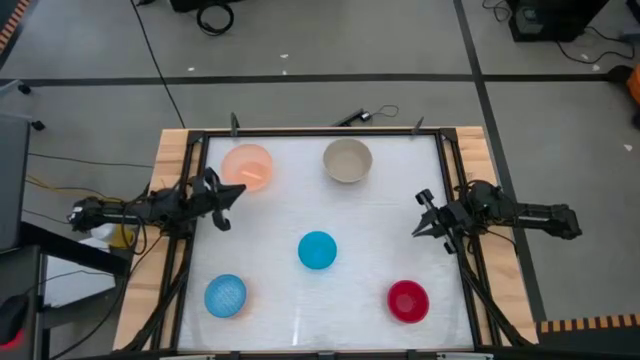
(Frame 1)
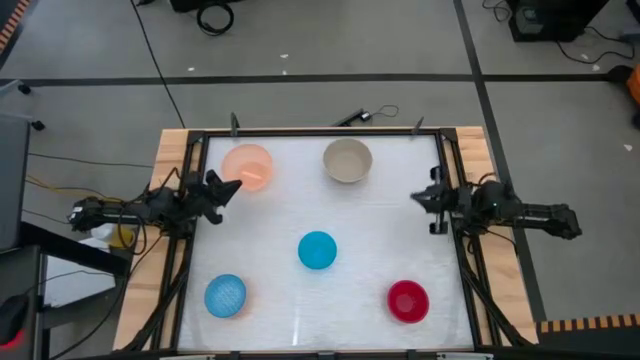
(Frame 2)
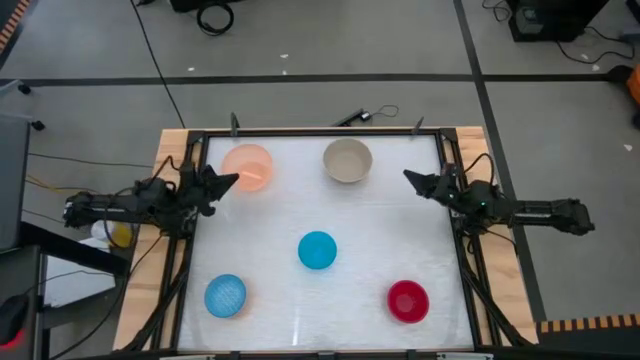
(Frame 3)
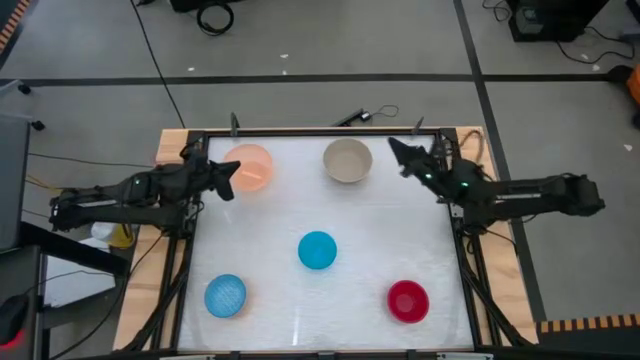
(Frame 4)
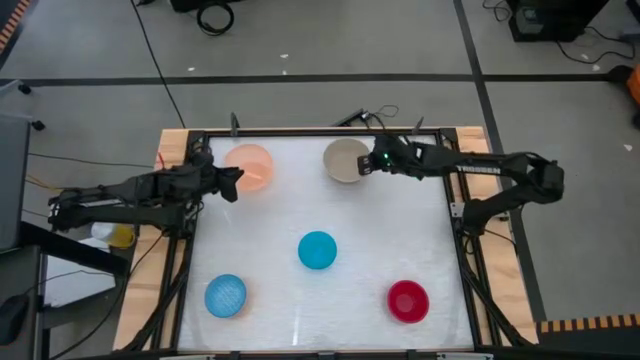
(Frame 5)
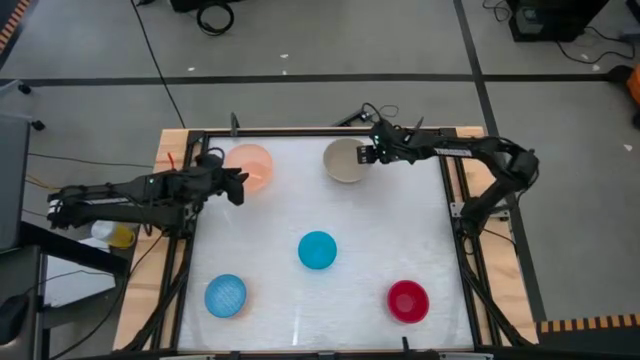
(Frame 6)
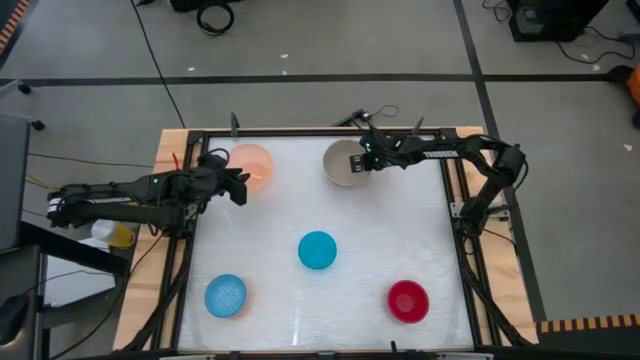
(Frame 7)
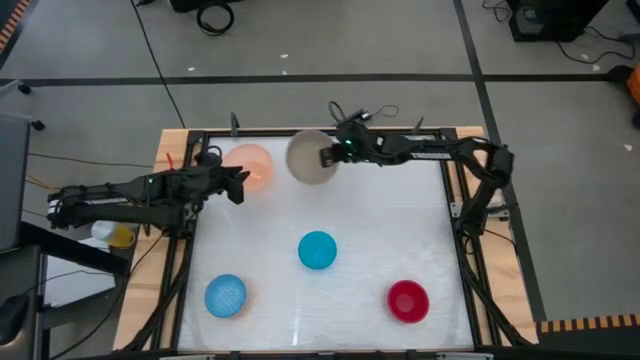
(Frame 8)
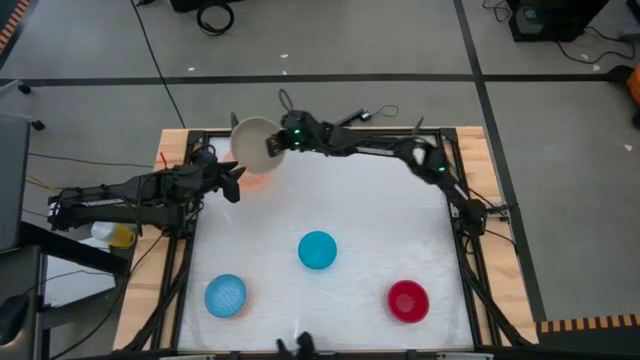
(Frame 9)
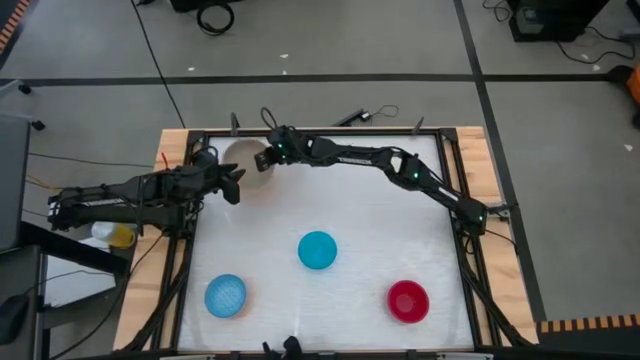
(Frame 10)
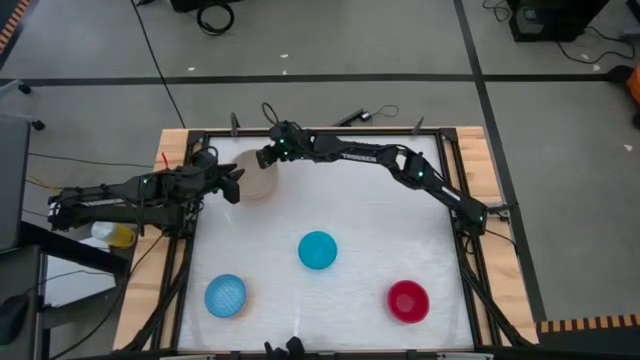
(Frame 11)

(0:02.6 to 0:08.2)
Stack the gray bowl on top of the orange bowl

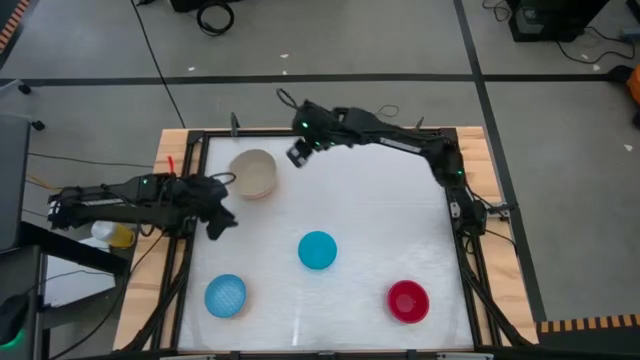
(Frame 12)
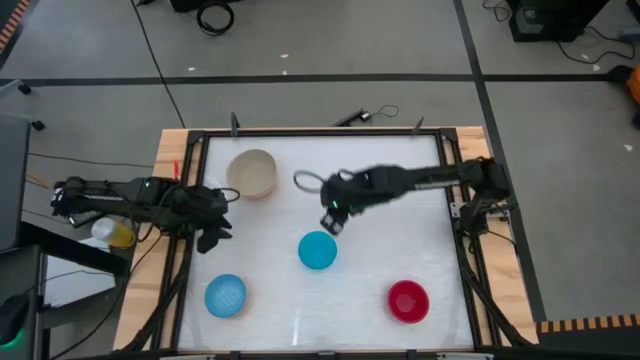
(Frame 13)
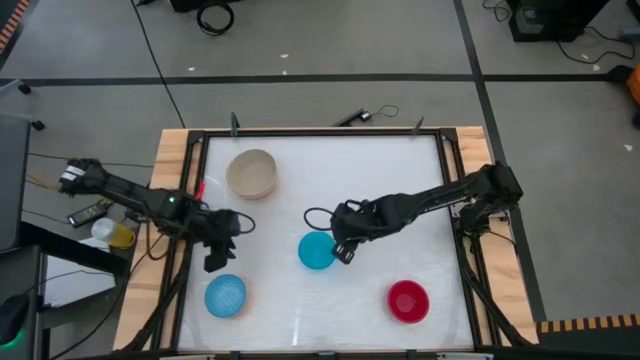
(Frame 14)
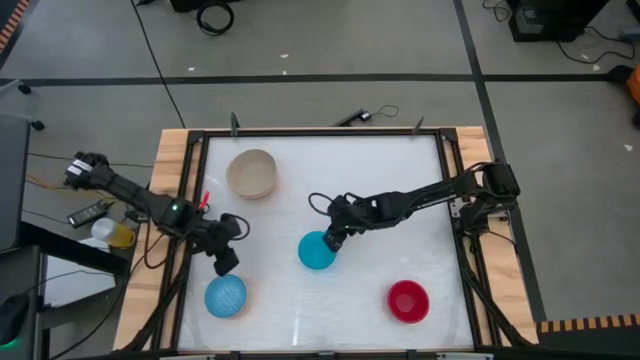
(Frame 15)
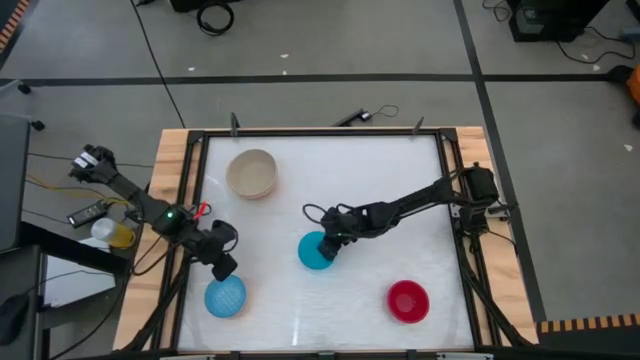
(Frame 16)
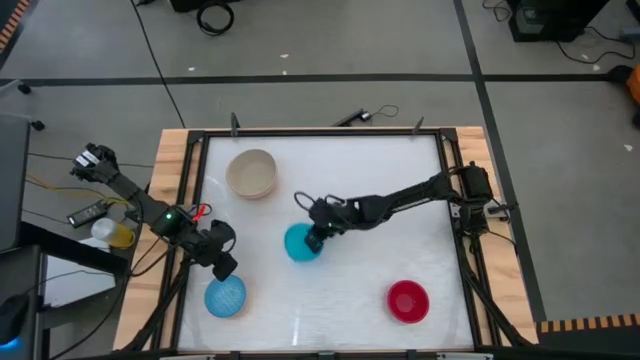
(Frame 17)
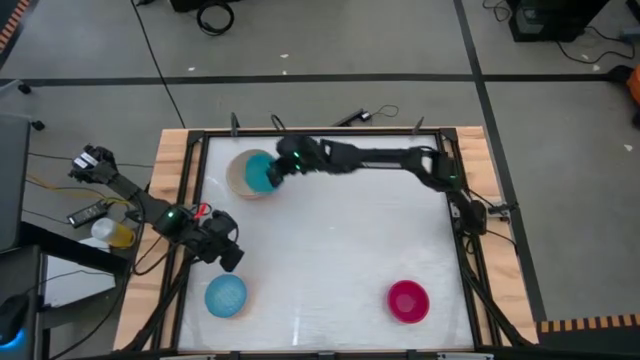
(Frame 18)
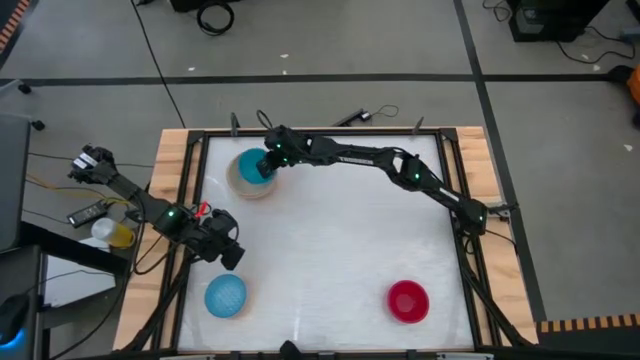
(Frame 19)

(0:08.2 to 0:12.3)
Stack the blue bowl on top of the gray bowl

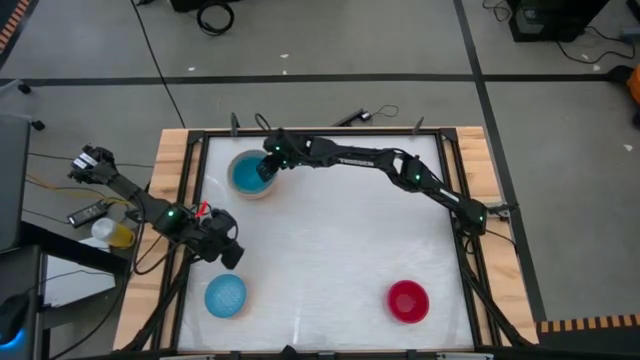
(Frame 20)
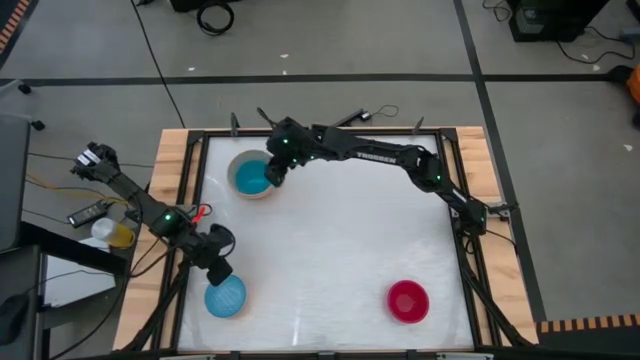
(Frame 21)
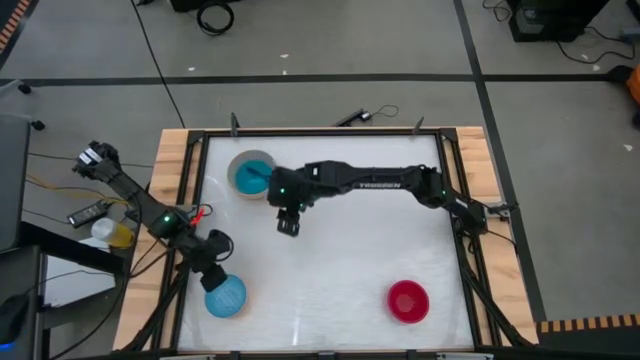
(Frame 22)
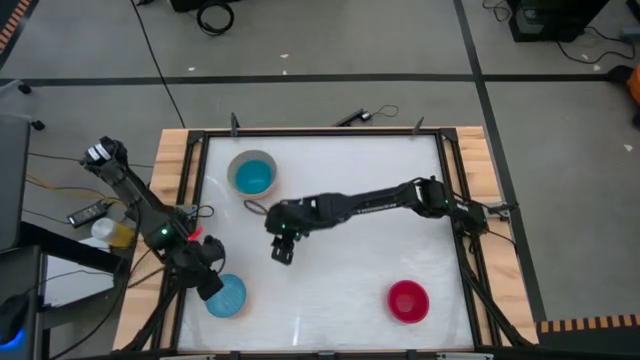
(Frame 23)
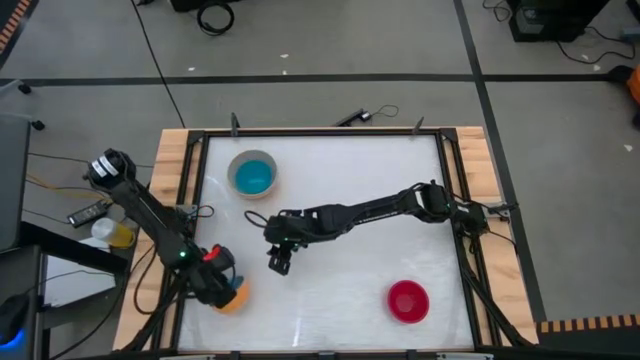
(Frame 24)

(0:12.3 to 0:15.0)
Stack the blue patterned bowl on top of the blue bowl

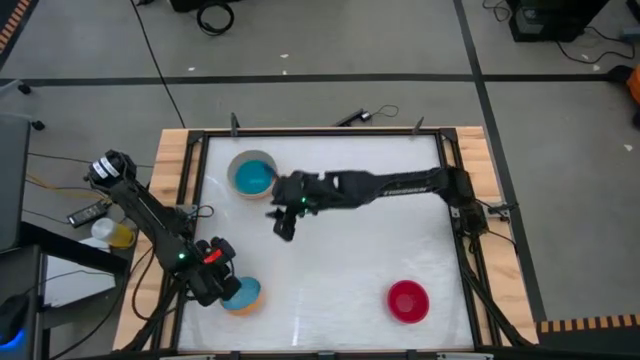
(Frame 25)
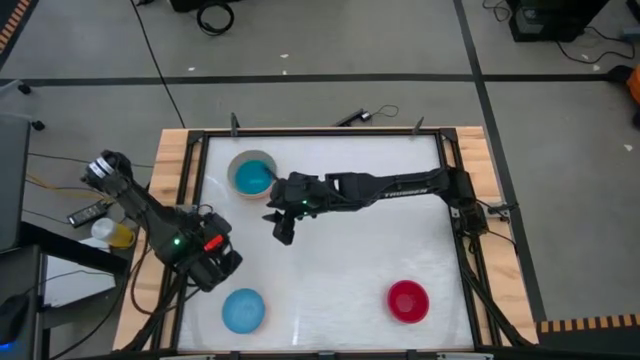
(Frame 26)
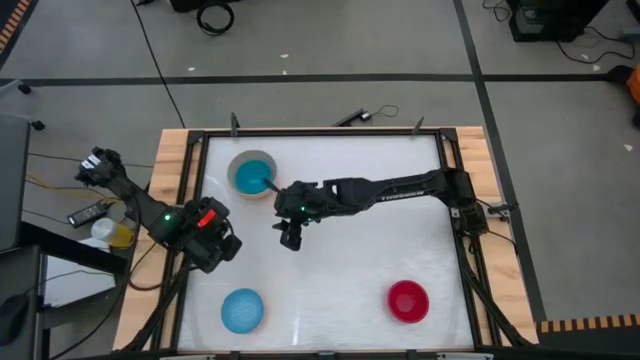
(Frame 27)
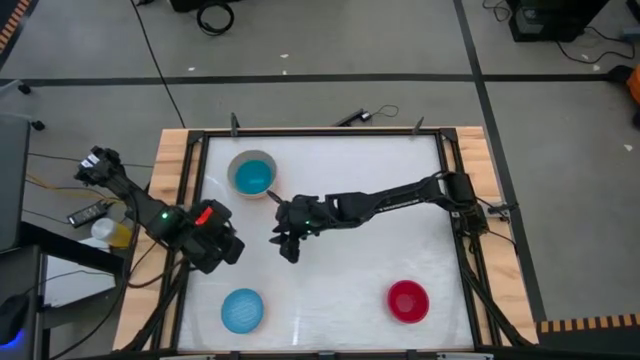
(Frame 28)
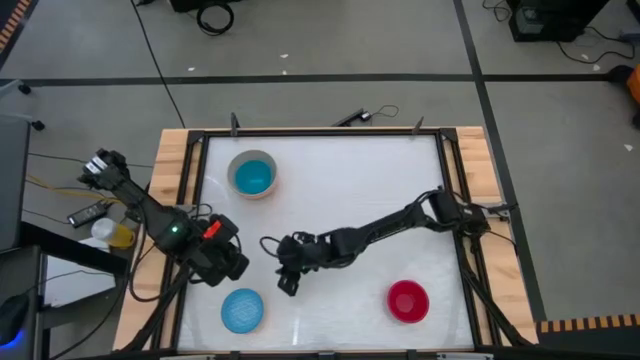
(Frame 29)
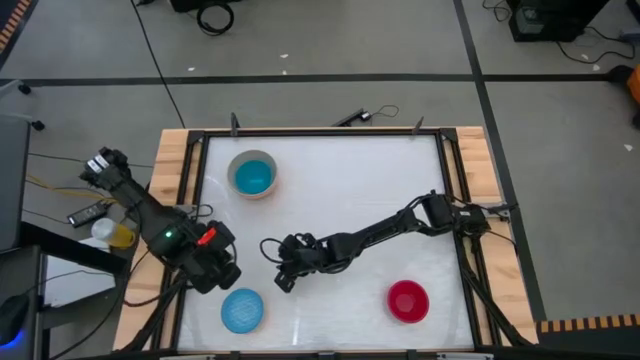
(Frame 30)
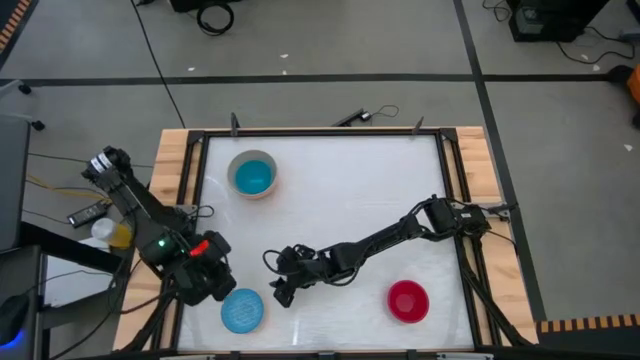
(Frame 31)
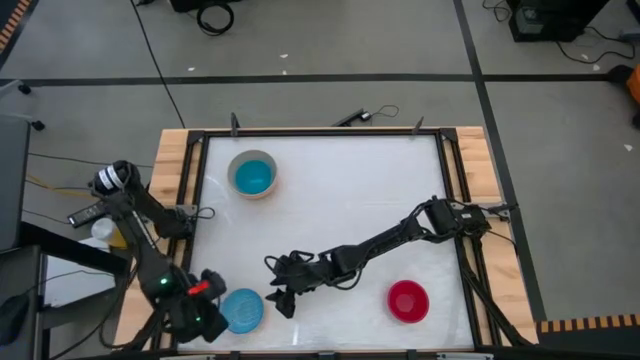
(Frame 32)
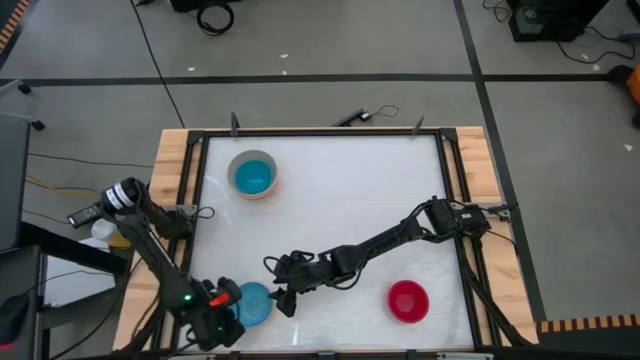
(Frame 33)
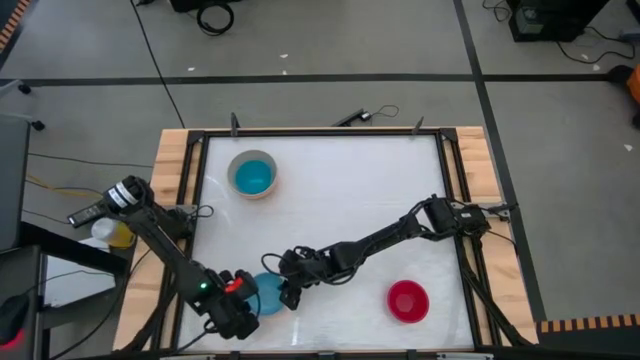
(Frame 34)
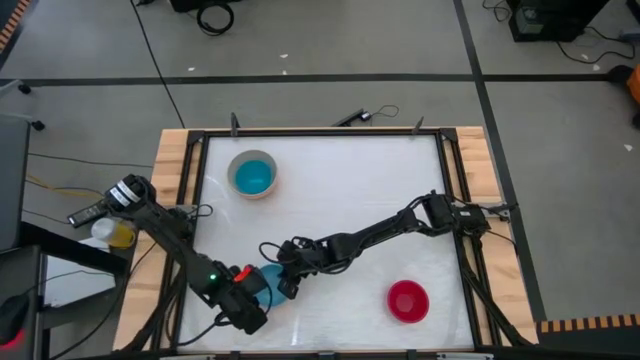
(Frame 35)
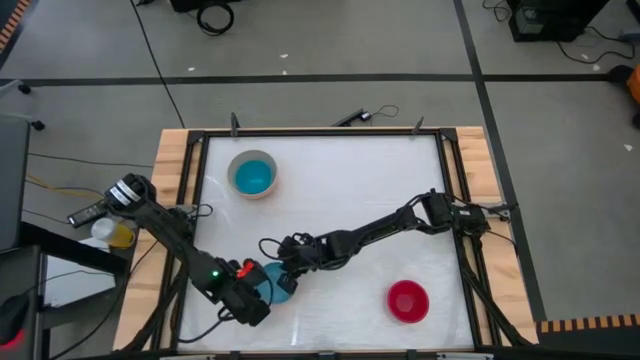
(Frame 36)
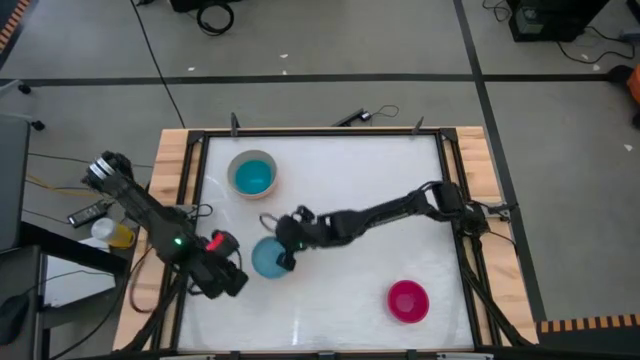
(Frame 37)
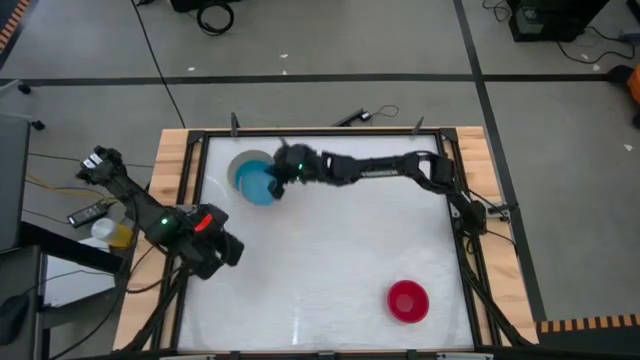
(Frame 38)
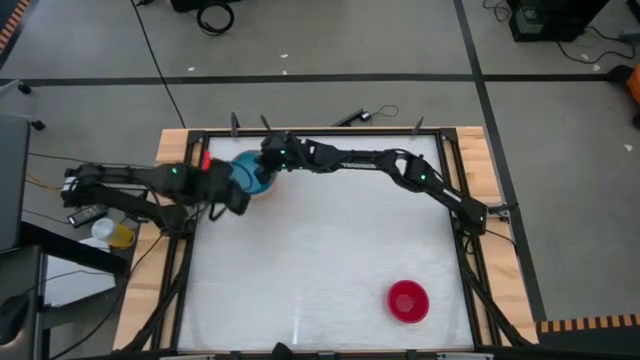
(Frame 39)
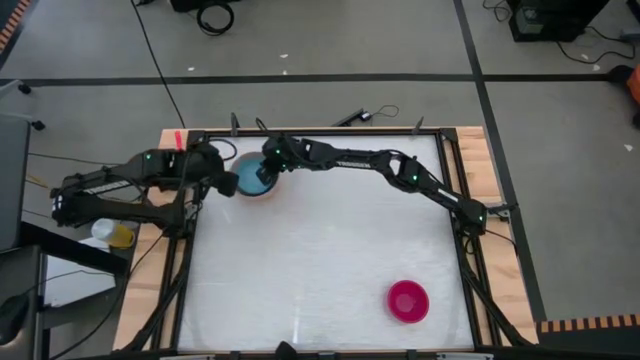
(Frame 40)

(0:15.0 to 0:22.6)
Stack the blue patterned bowl on top of the blue bowl

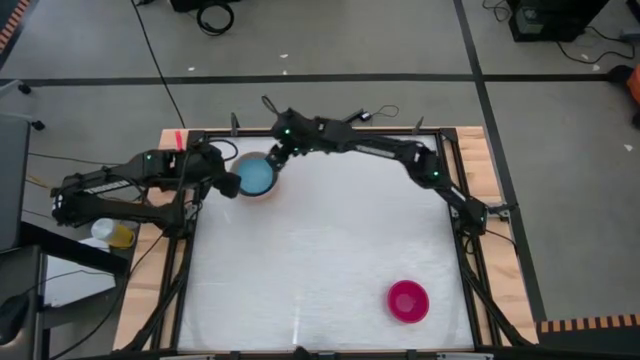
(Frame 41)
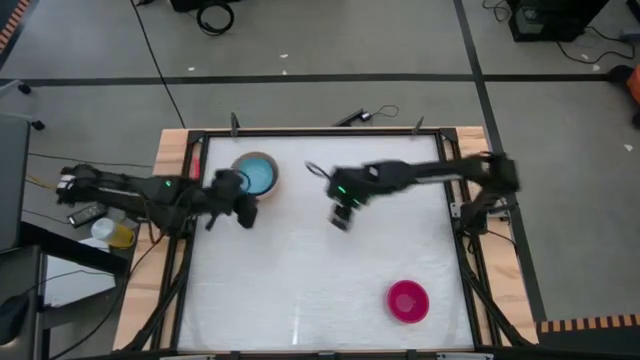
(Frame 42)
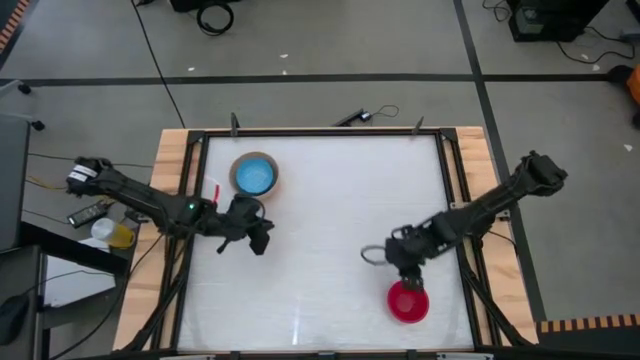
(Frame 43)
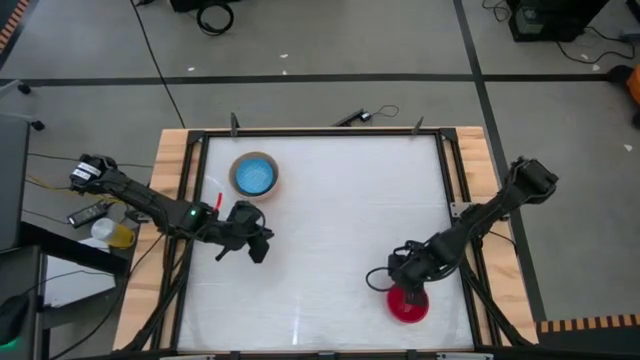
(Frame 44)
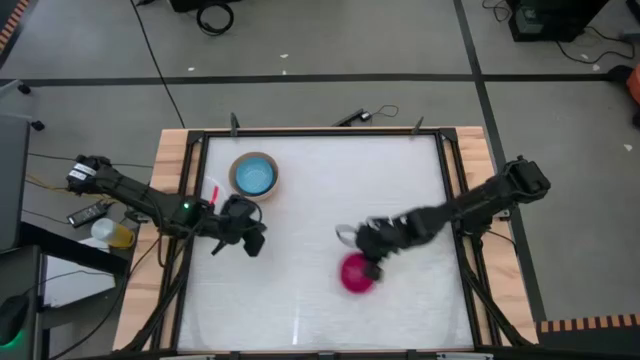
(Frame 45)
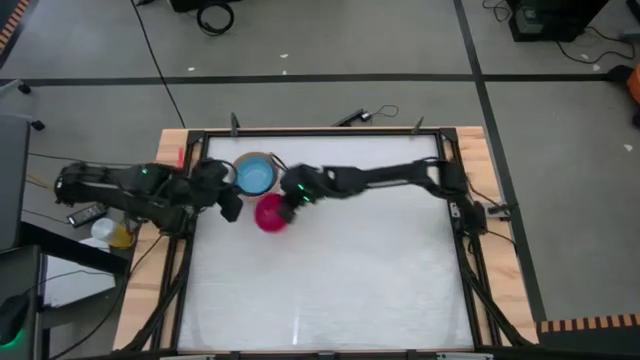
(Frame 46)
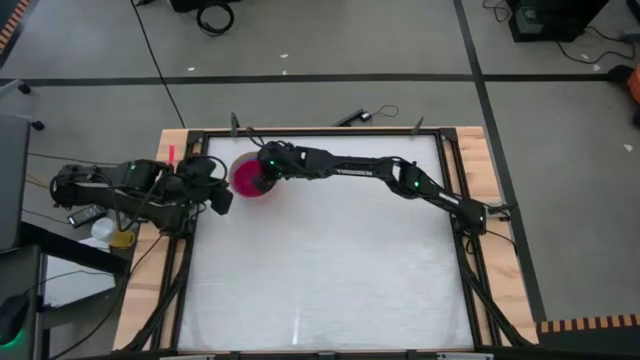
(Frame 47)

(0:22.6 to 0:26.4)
Stack the red bowl on top of the blue patterned bowl
